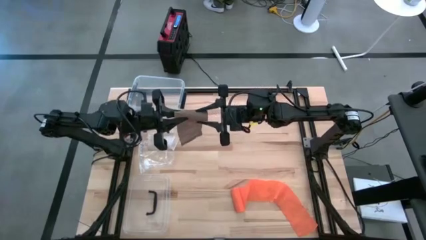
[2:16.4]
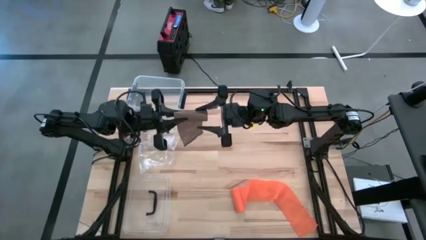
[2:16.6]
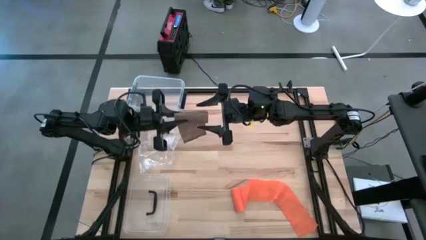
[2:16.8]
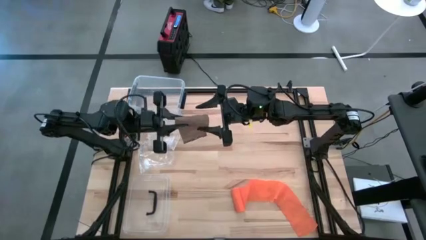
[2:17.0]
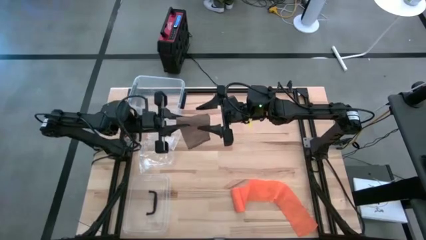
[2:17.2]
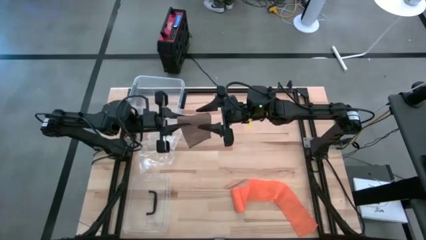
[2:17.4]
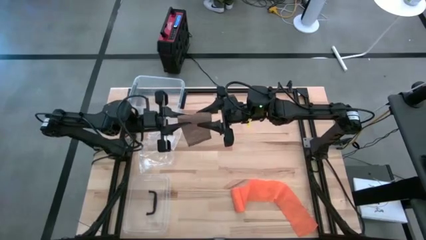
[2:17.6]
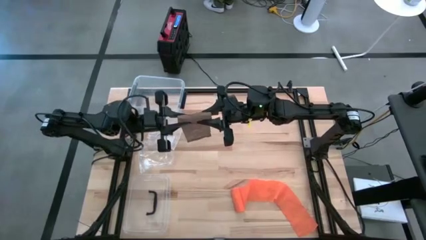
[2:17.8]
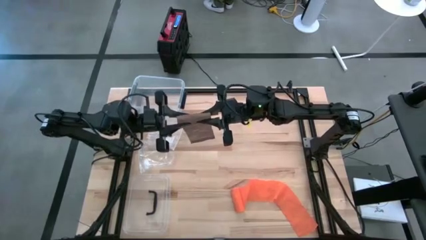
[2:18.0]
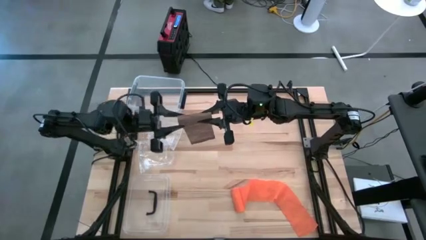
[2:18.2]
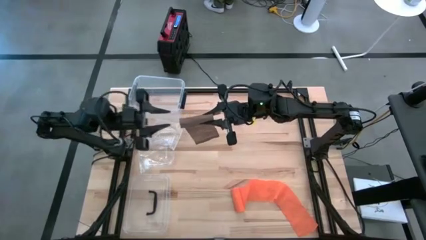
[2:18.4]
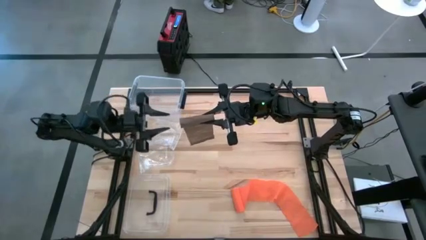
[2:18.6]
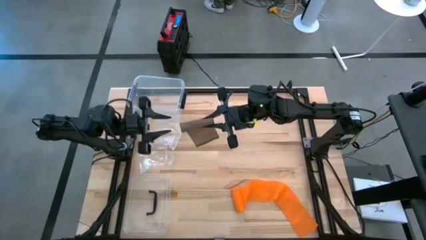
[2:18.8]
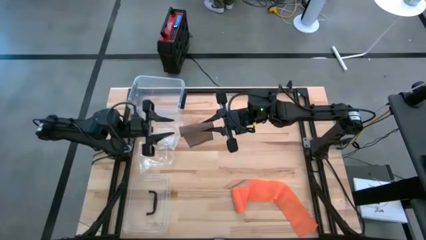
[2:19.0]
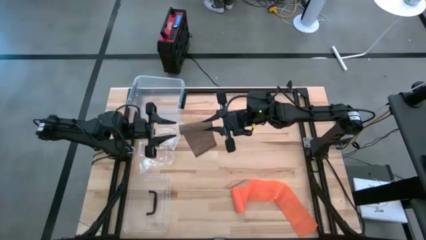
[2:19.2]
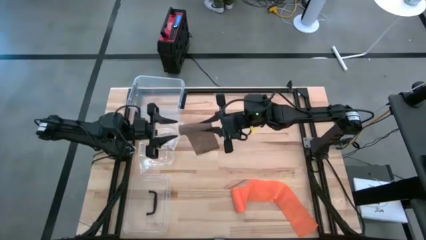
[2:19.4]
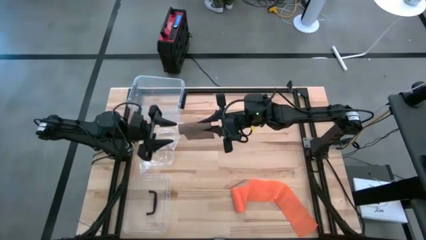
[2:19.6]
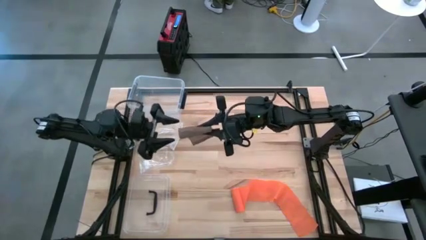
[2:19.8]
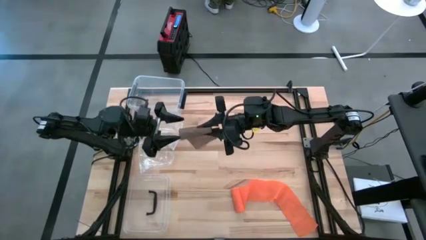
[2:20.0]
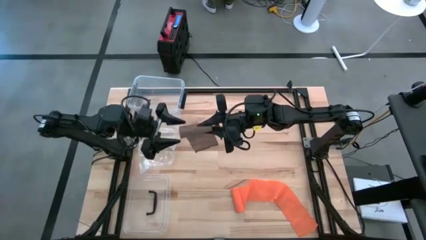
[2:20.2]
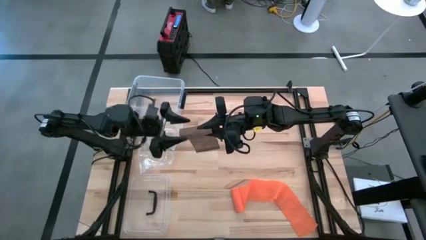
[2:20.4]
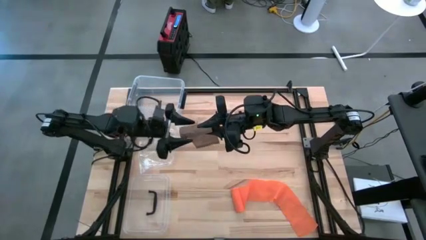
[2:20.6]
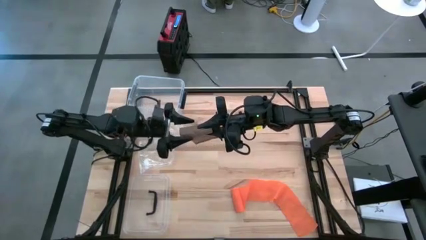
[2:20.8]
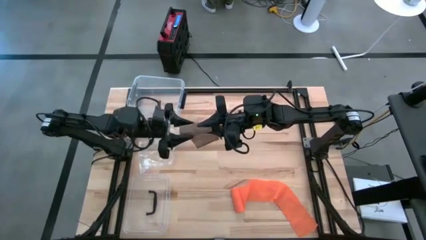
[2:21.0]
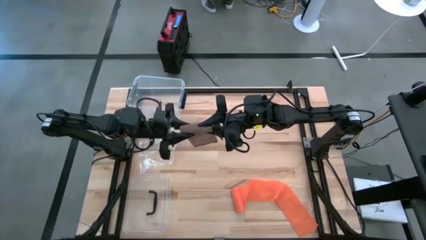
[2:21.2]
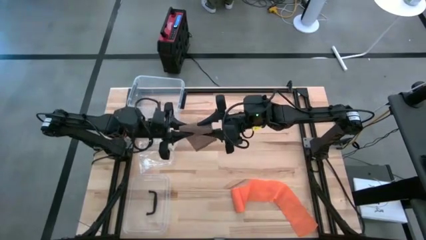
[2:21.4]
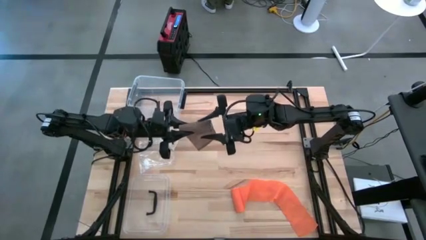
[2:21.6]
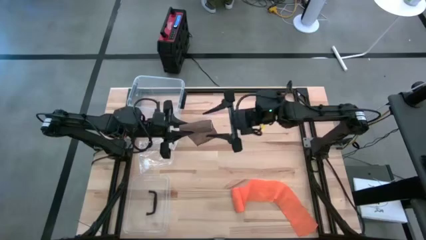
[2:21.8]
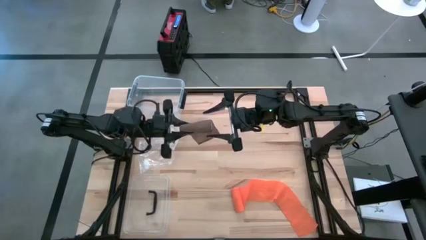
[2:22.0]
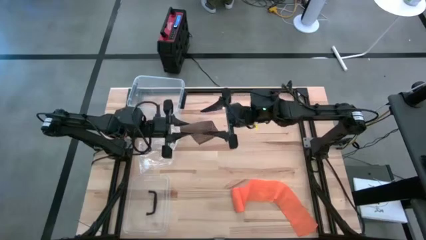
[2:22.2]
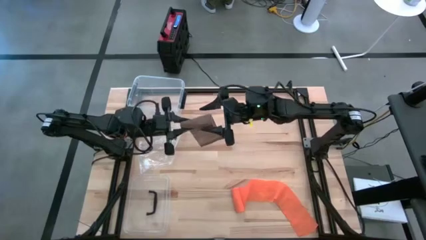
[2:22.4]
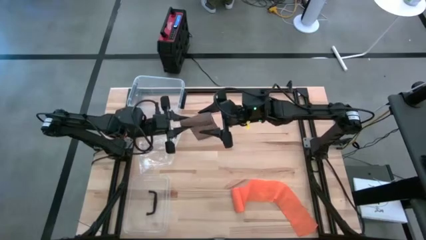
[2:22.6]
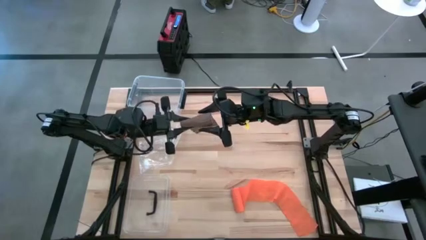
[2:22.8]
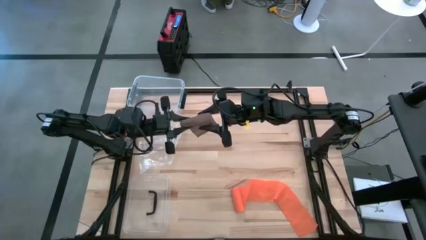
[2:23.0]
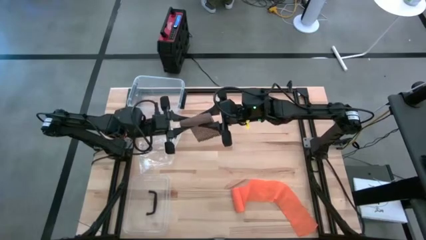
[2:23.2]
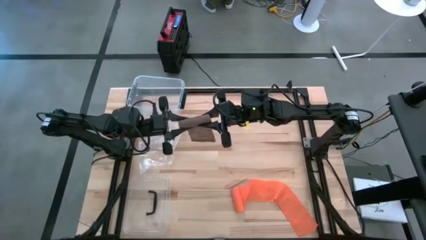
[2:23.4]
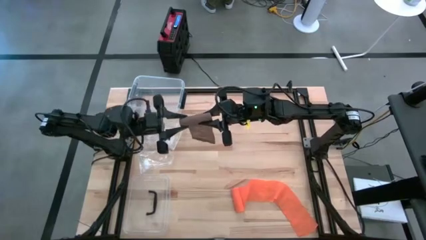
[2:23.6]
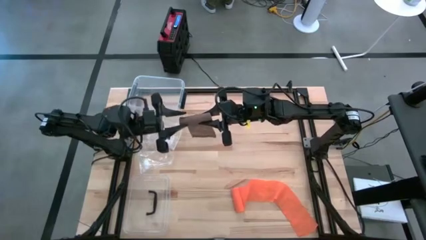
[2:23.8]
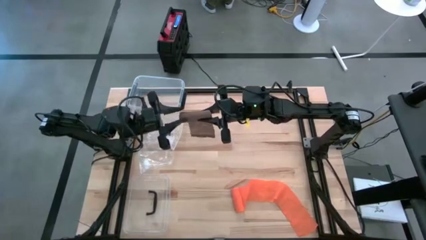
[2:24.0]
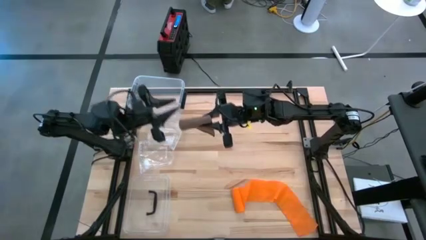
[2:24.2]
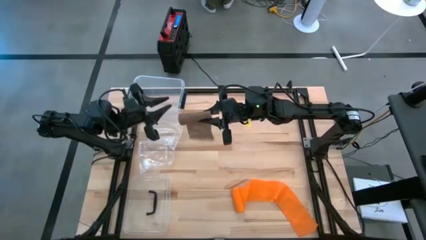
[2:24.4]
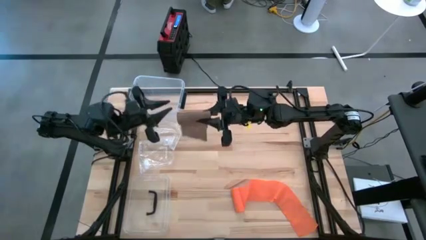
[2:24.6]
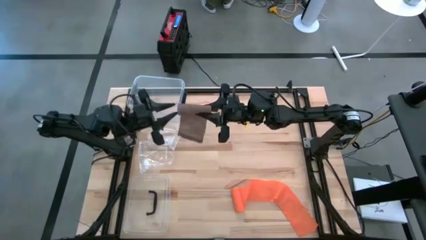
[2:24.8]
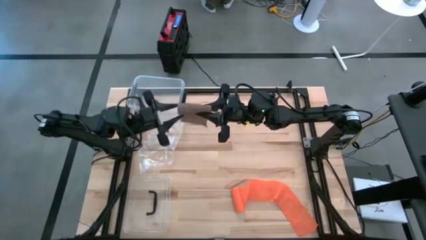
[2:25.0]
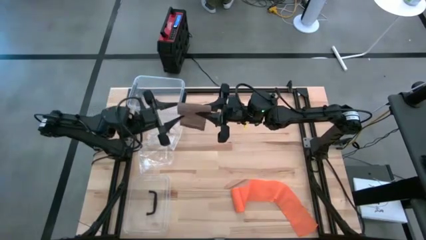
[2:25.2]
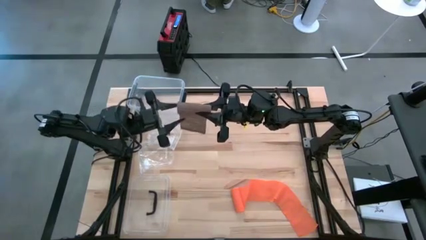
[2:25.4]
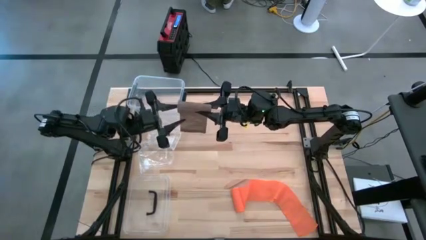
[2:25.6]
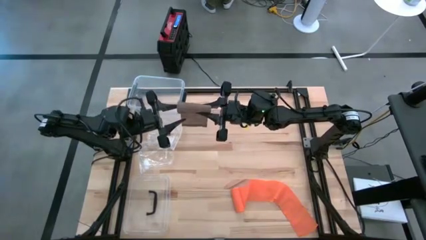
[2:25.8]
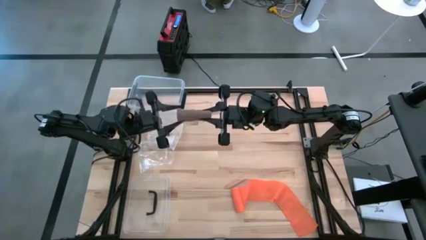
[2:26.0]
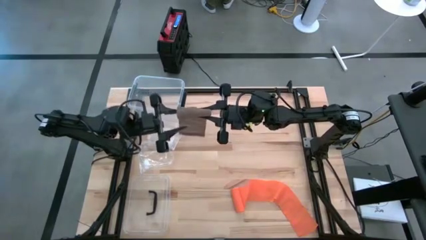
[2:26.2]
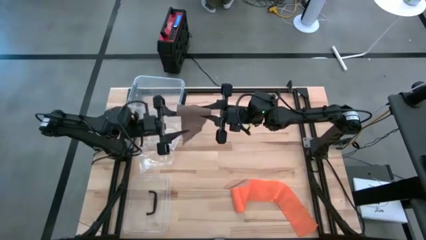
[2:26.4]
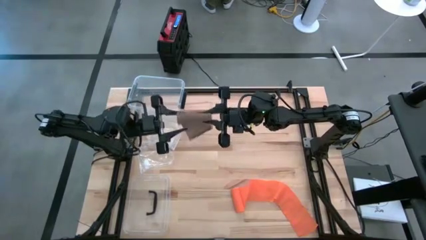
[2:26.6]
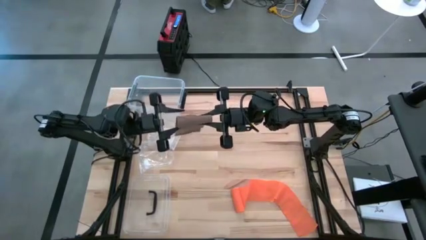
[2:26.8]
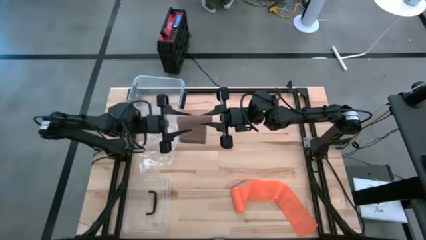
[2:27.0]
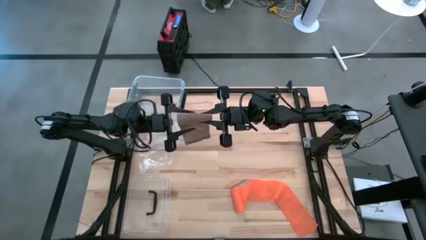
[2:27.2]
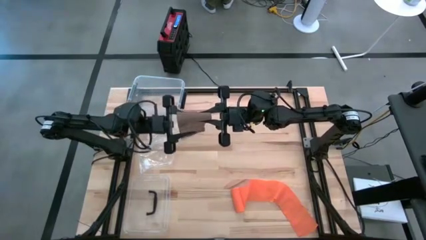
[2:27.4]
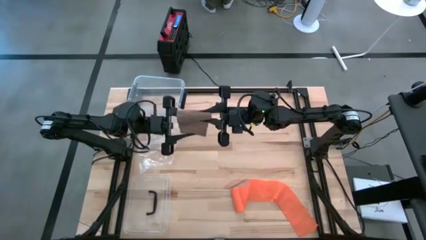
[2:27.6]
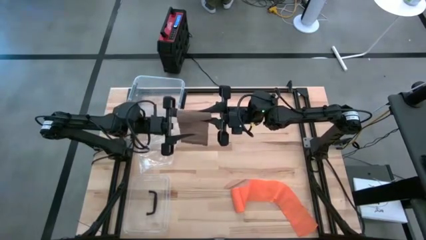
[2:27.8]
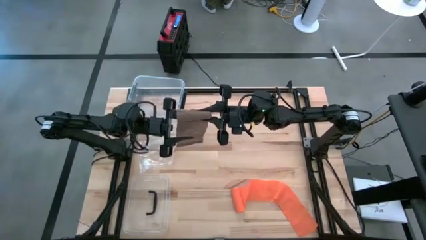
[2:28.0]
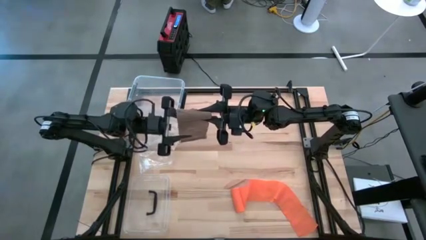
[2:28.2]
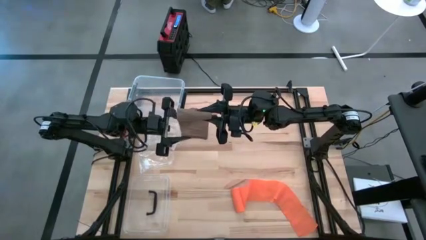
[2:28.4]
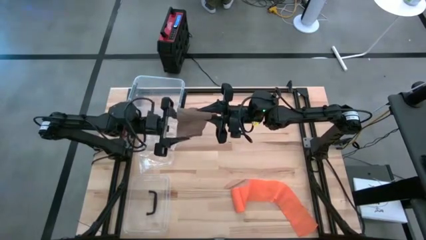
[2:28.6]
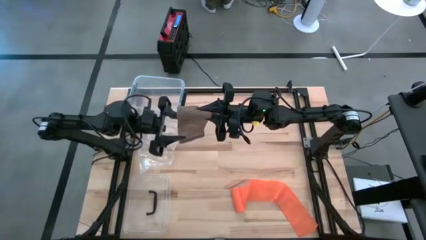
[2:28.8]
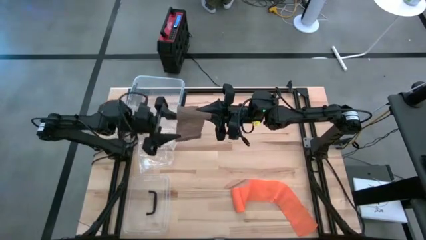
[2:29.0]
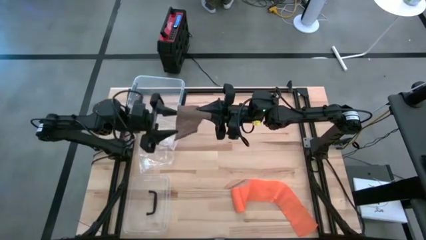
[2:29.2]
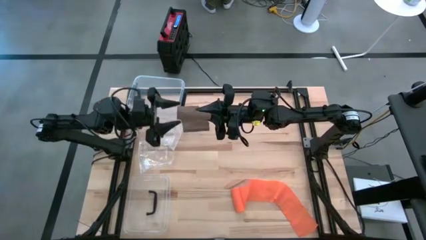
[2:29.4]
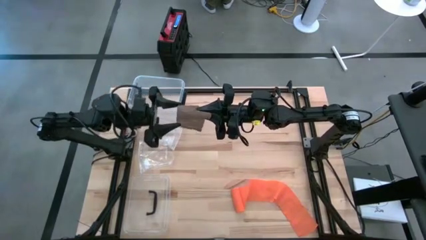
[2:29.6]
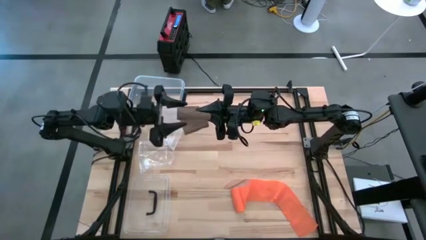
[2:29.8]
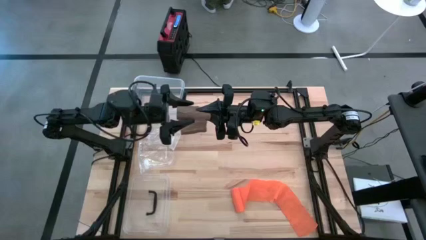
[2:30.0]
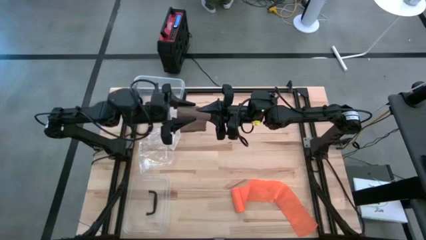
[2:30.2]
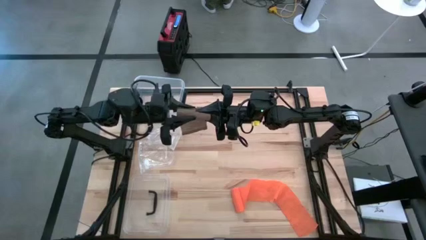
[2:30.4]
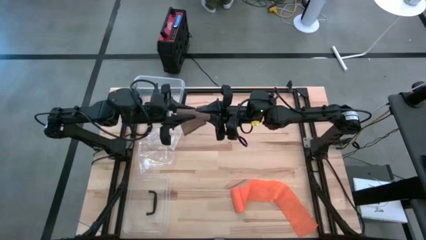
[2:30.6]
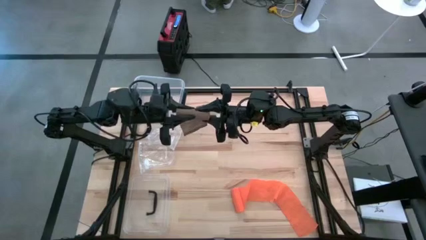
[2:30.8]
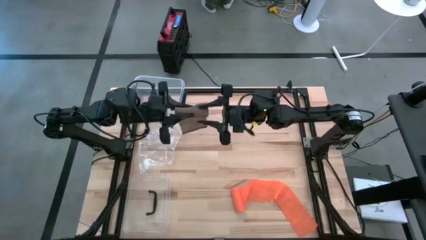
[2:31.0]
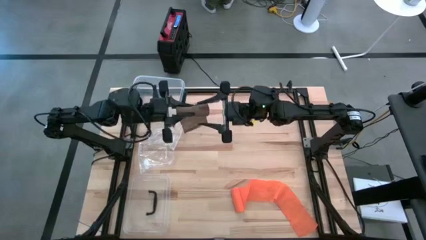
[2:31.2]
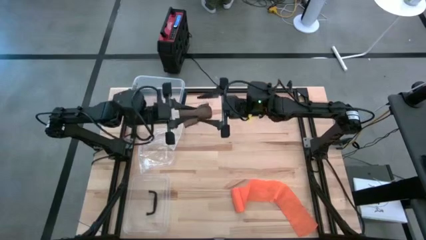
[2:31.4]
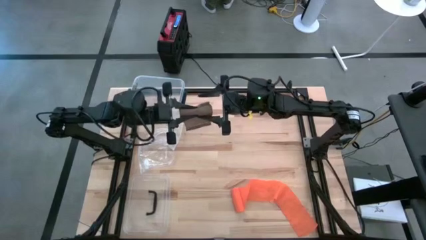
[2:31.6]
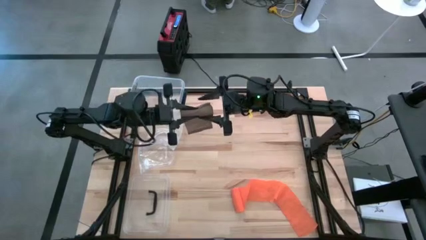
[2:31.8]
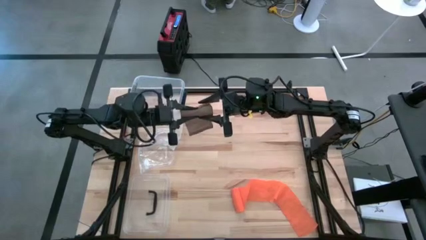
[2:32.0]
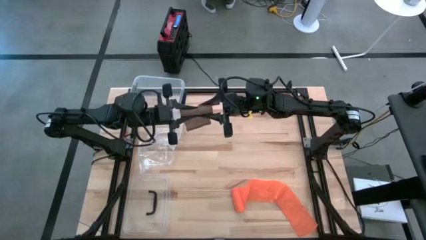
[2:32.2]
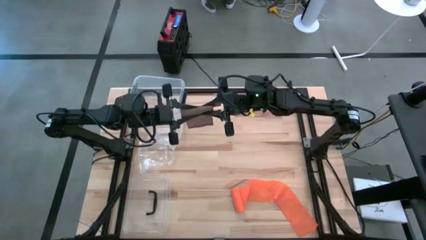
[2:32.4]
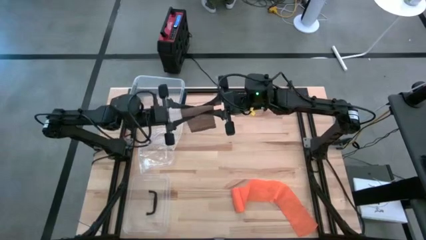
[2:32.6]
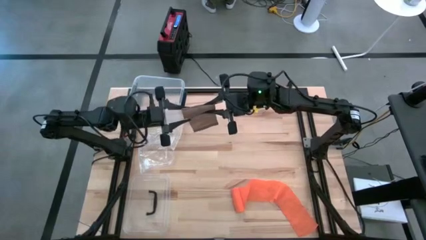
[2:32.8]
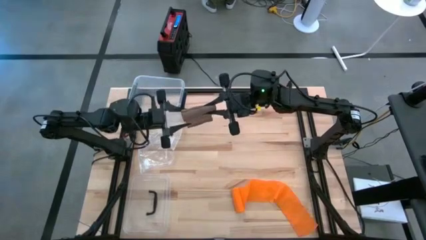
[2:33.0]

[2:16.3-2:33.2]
Task: Roll bandage
Roll the brown bandage
